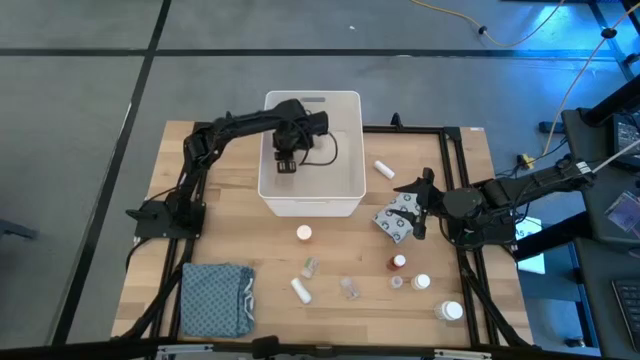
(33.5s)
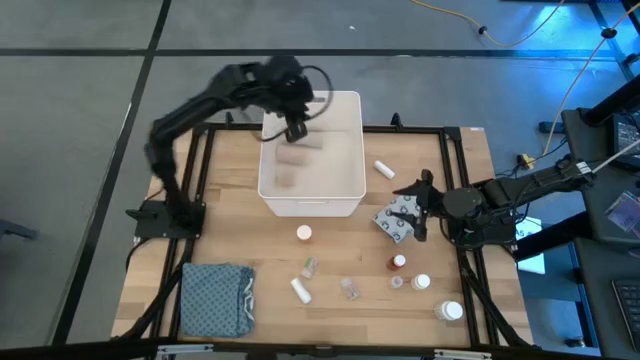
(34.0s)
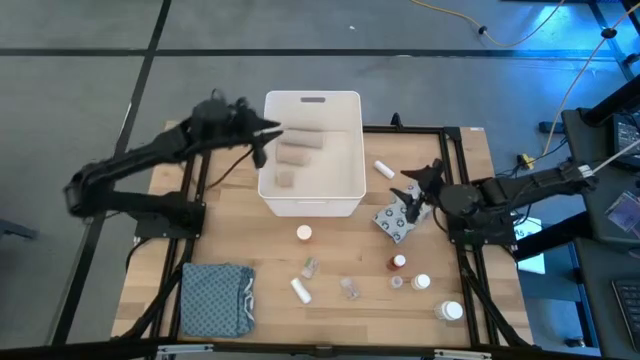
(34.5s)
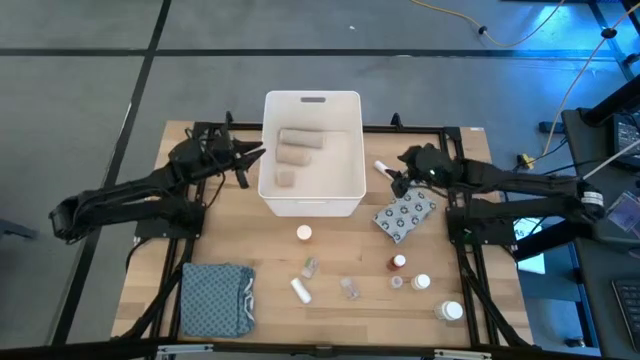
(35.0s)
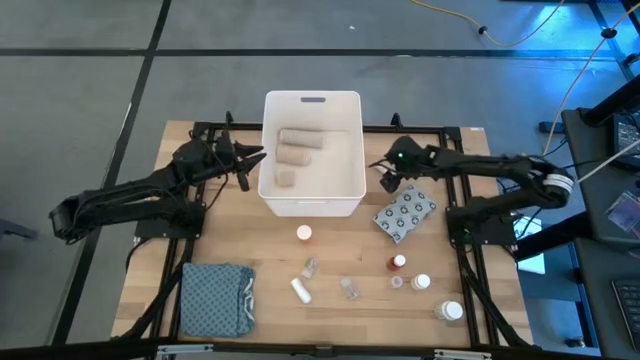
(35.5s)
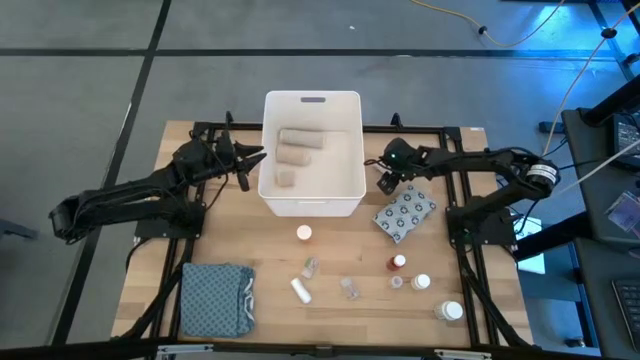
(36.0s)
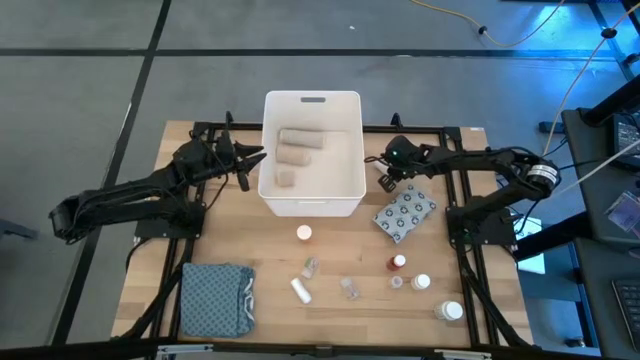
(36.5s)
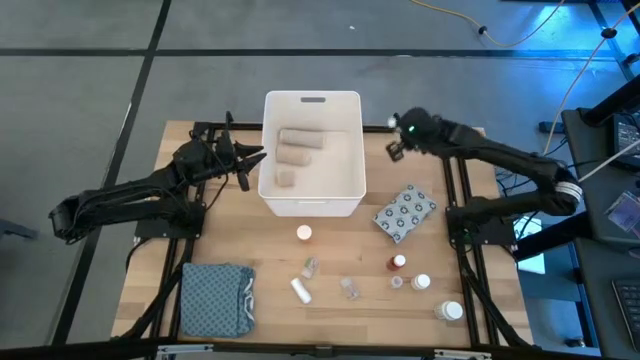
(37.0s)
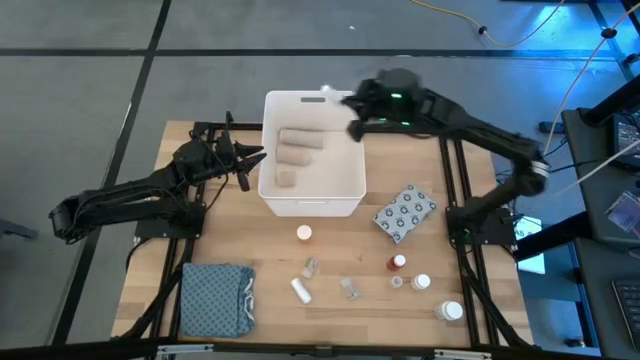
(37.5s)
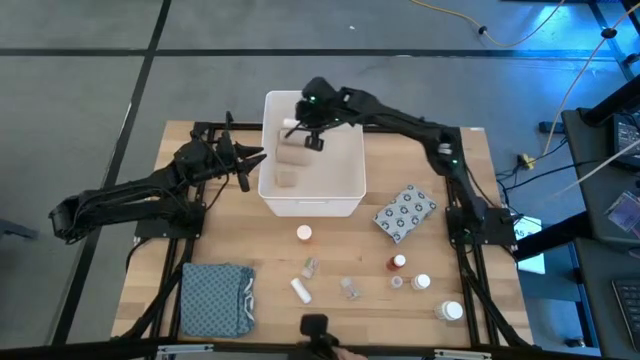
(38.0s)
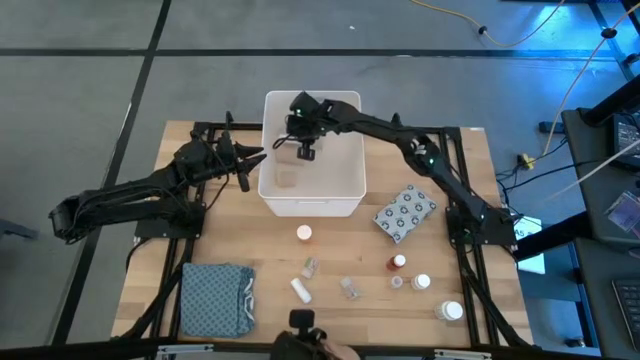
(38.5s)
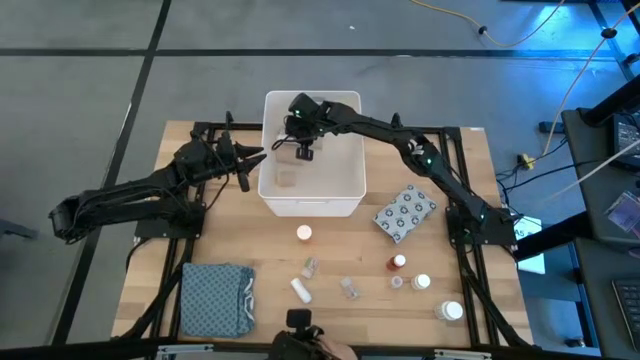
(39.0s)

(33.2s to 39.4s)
Task: Pick & place medical supplies in basket/bin
Put the top rolled white gauze into the white bin

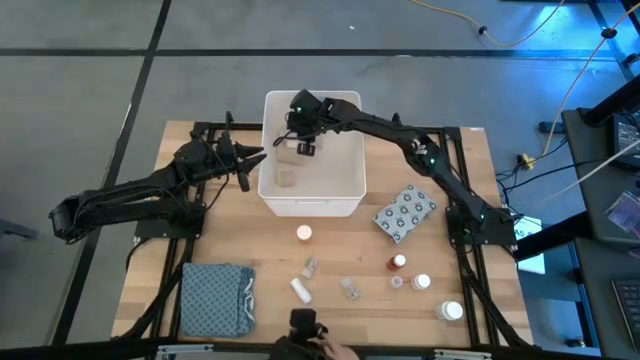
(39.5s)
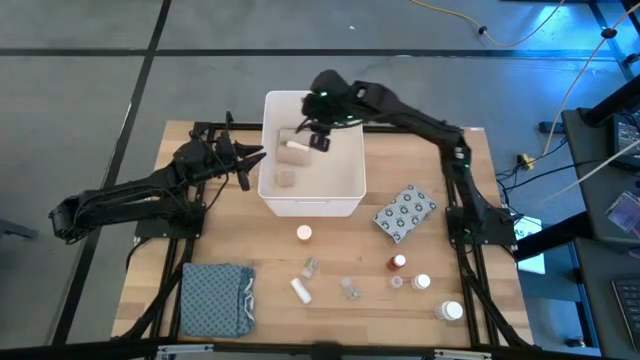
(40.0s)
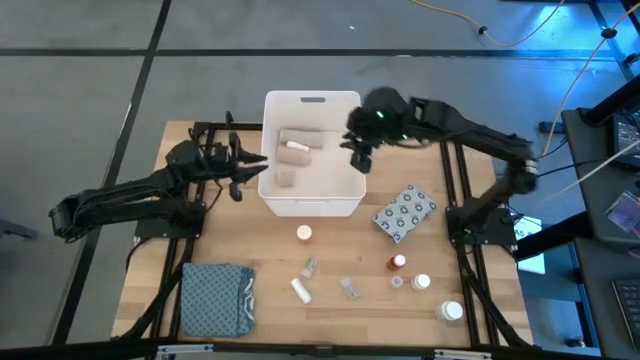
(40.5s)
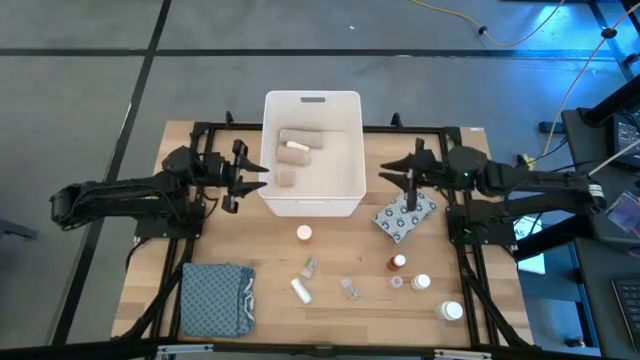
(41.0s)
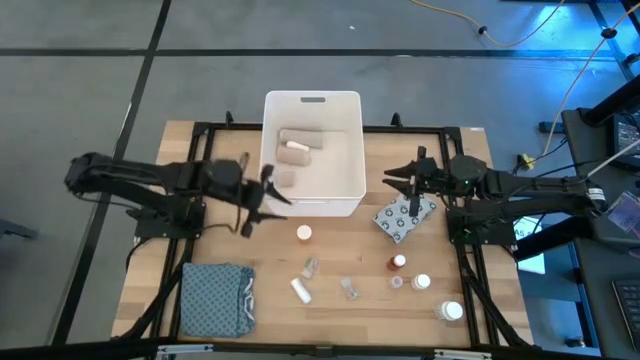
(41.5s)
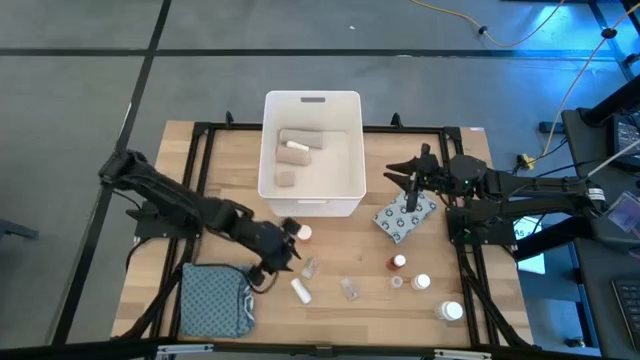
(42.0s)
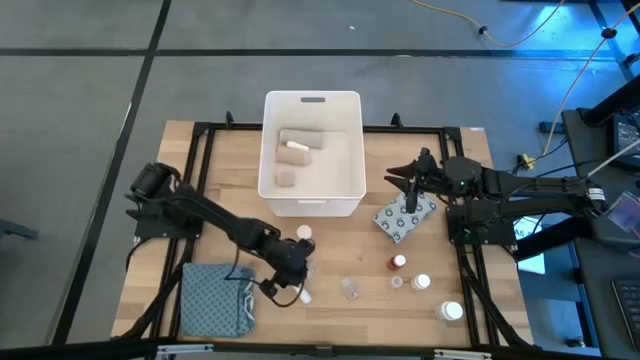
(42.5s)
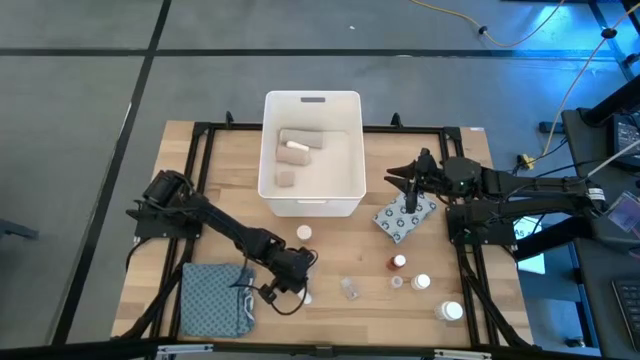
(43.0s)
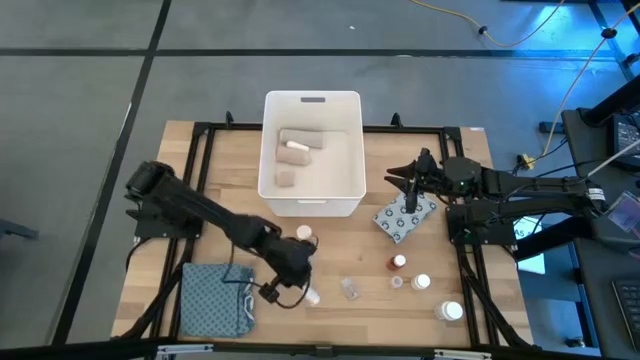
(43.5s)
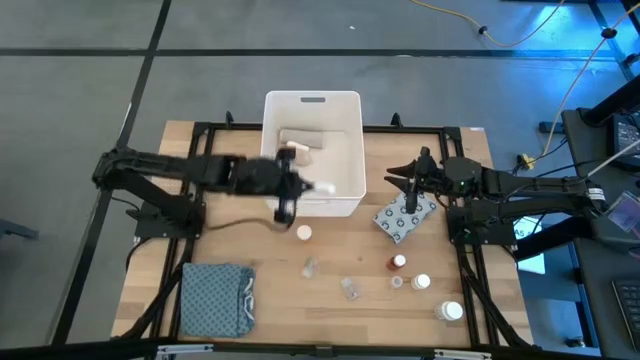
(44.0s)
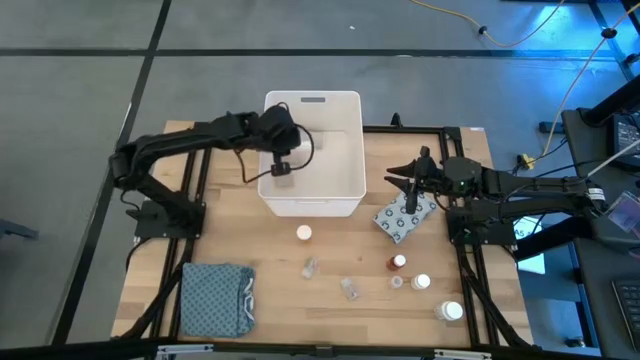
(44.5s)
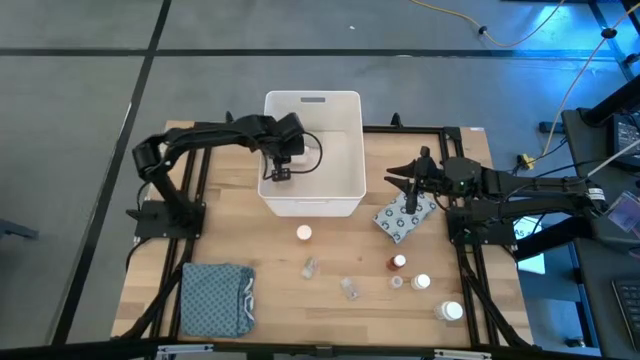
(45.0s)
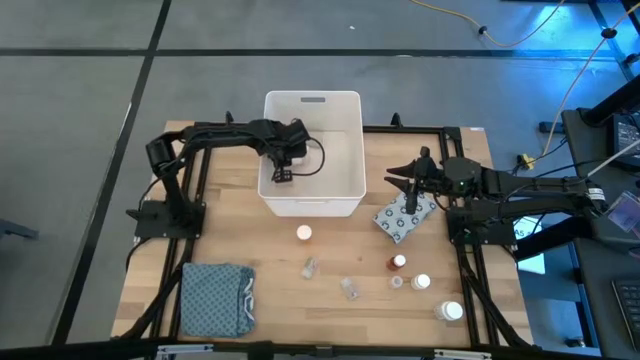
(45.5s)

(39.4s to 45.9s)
Put the rolled white gauze into the white bin

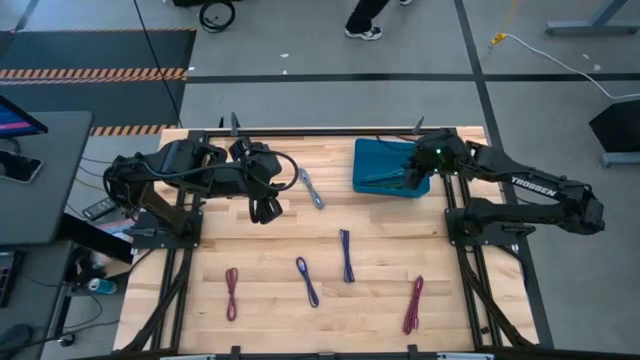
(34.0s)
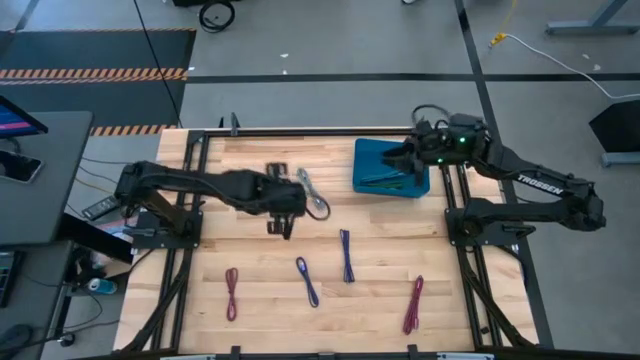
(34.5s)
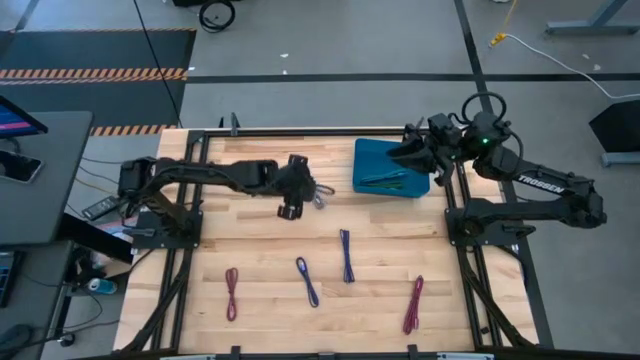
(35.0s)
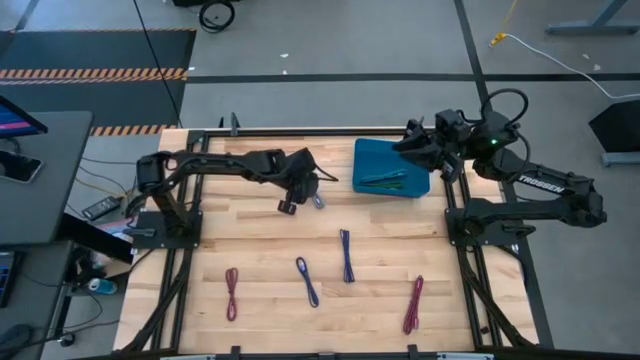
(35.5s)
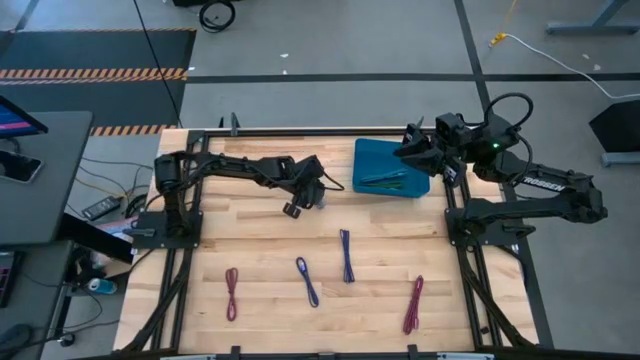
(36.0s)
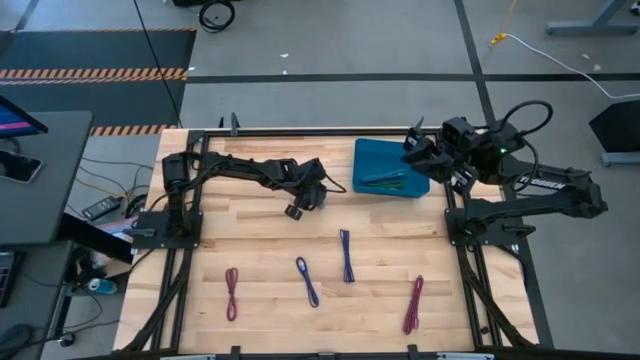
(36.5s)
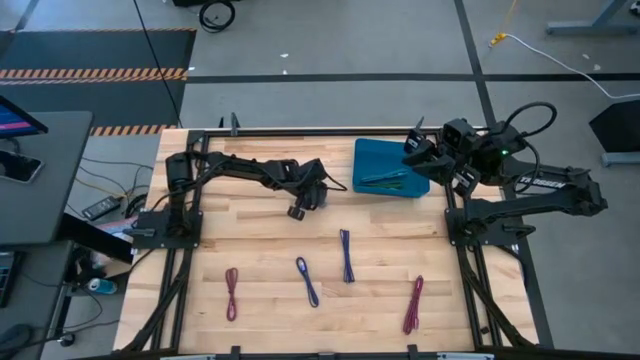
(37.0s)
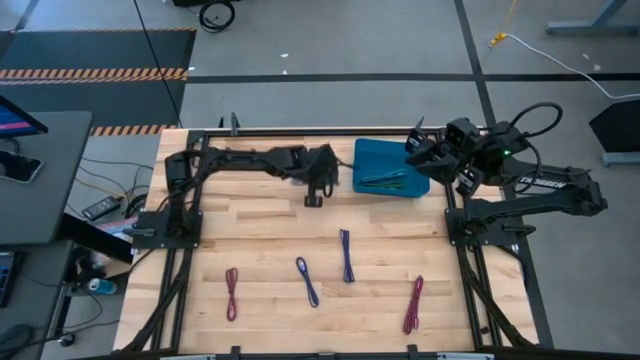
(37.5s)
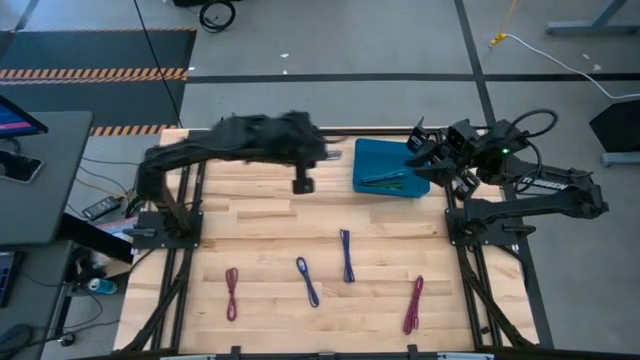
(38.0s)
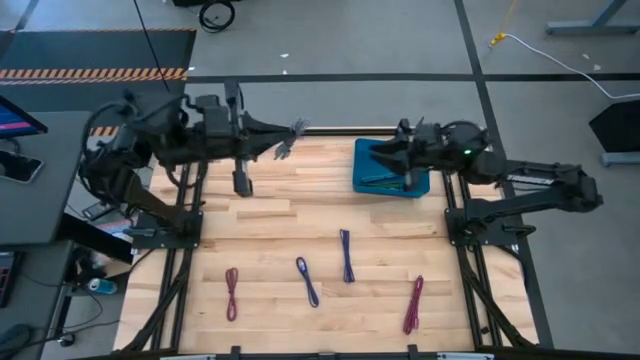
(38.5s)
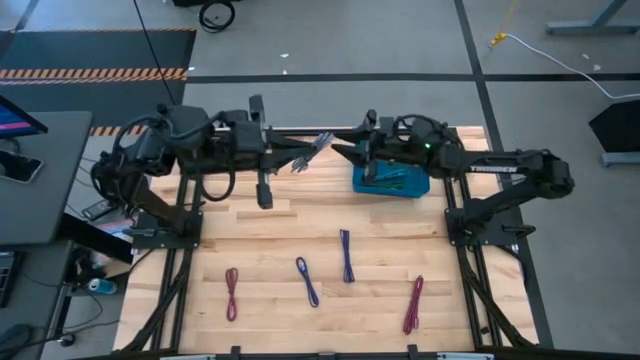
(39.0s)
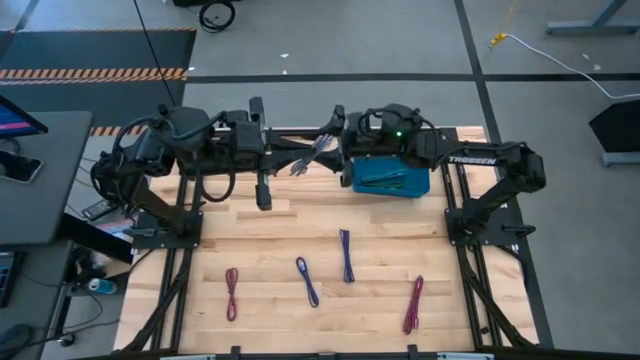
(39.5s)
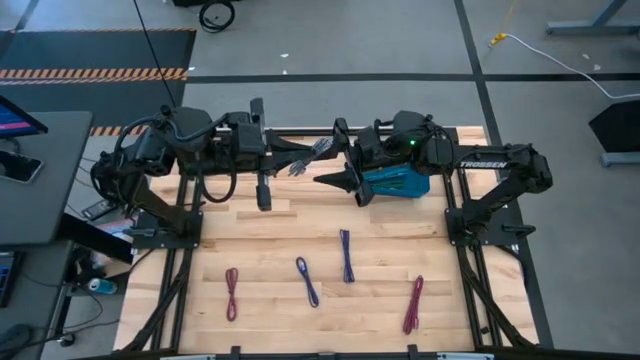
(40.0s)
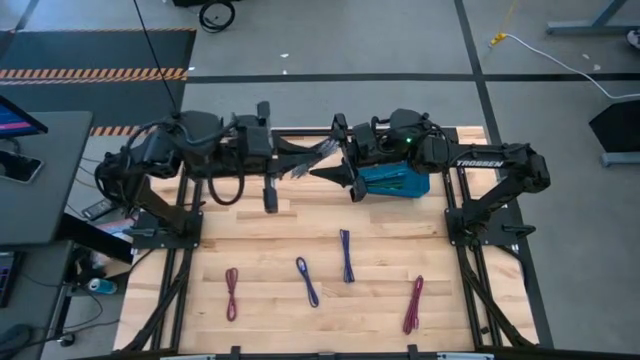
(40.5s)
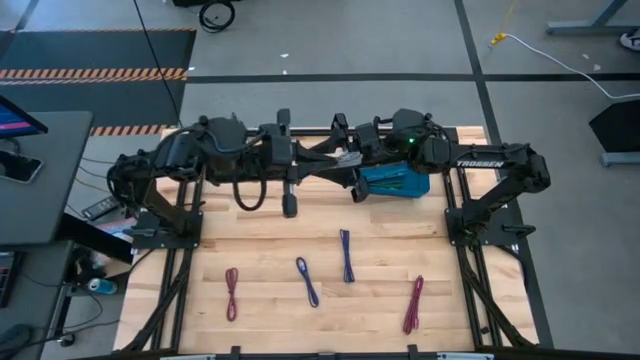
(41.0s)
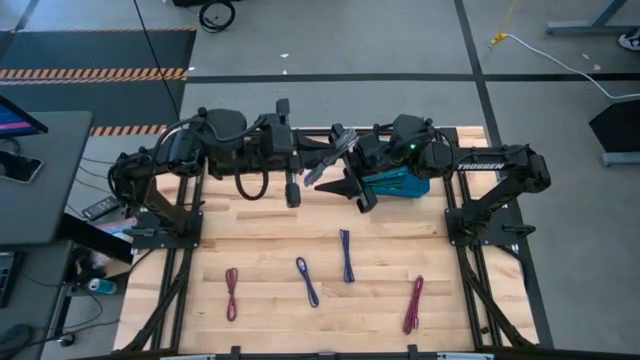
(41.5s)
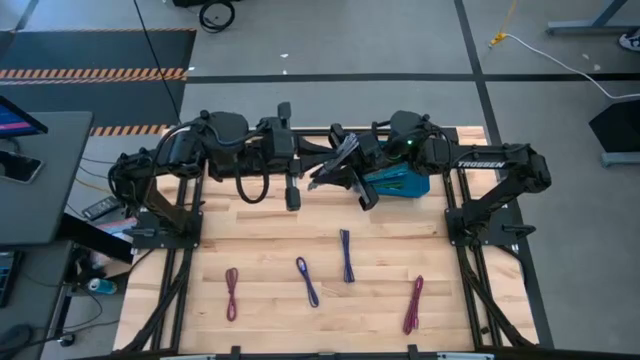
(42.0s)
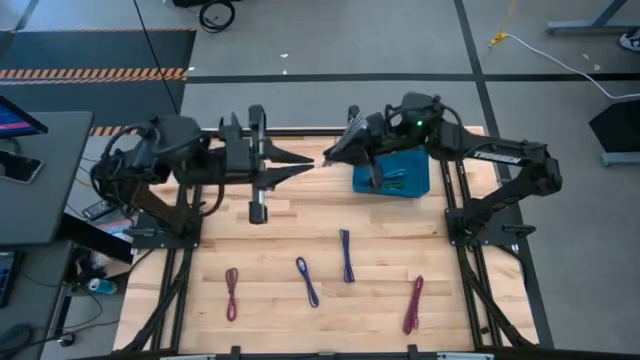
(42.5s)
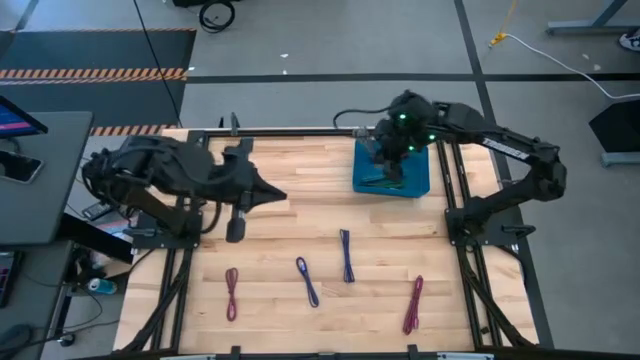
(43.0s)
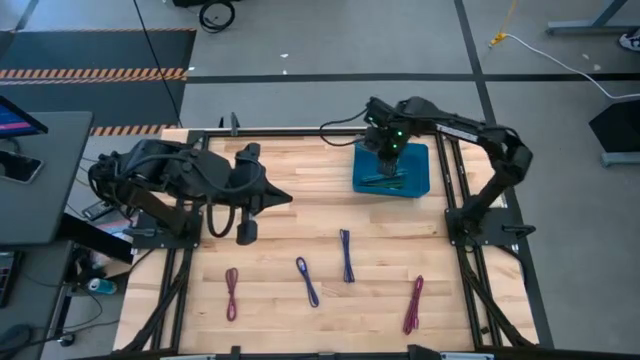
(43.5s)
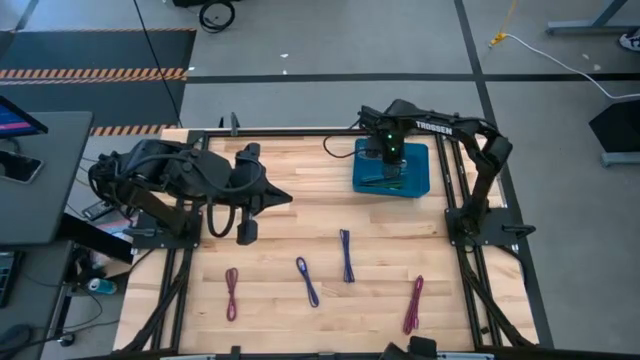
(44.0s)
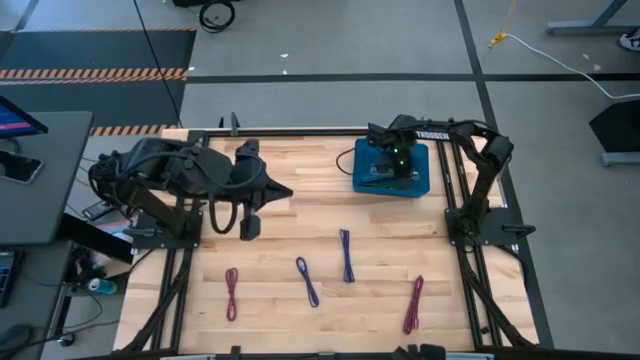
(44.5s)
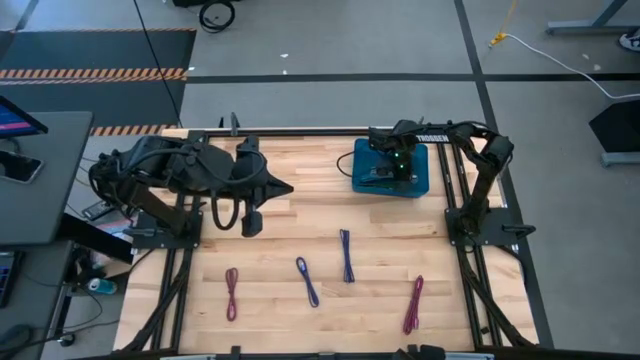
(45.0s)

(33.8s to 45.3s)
Task: Pick and place USB-C Cables
Put the black white charger cable into the blue bin
